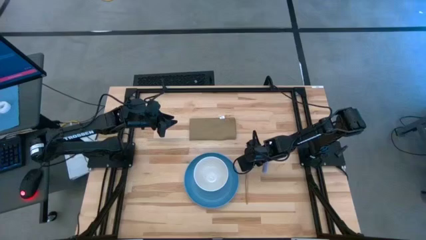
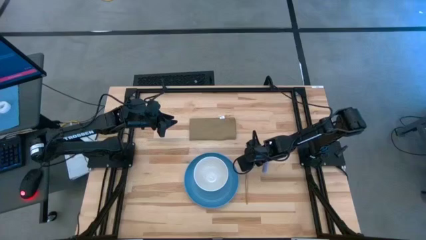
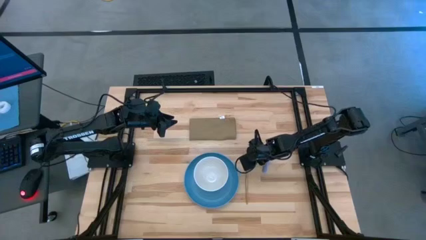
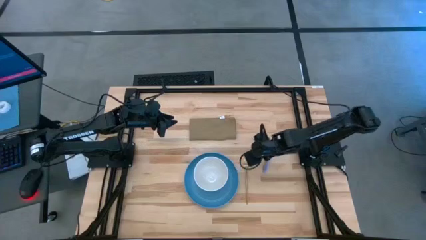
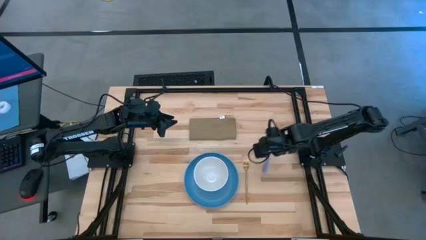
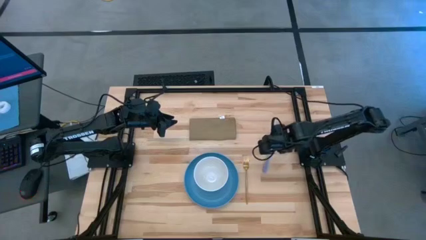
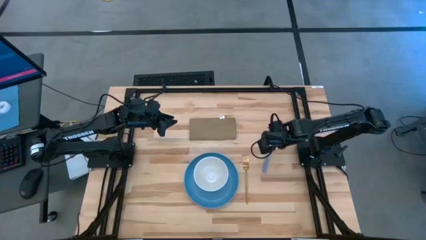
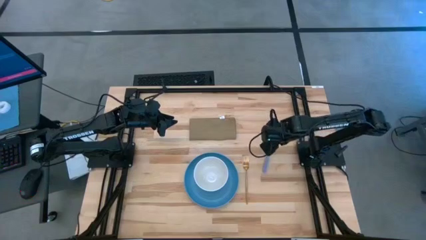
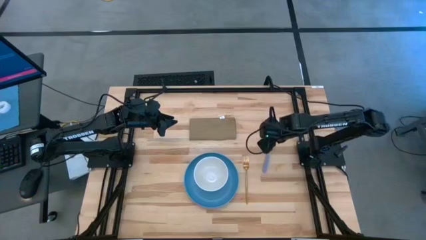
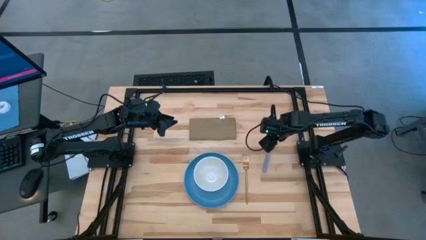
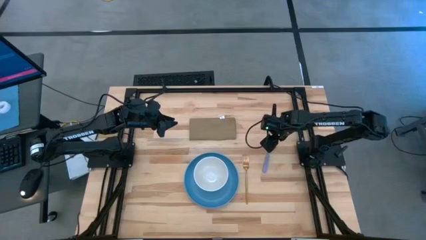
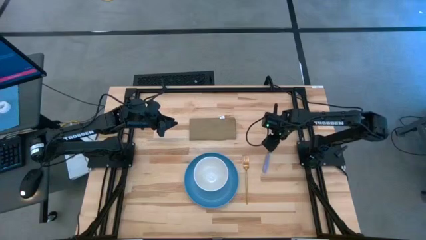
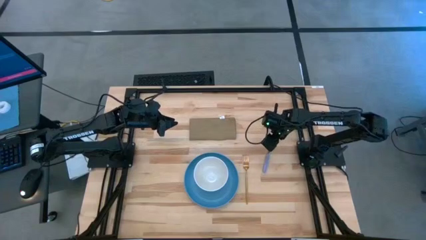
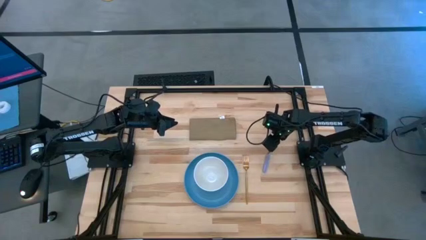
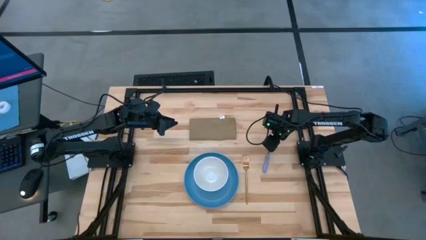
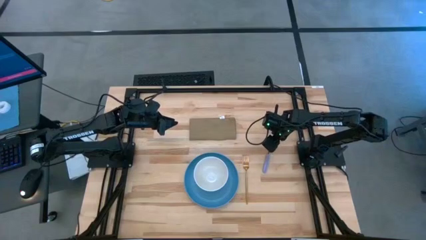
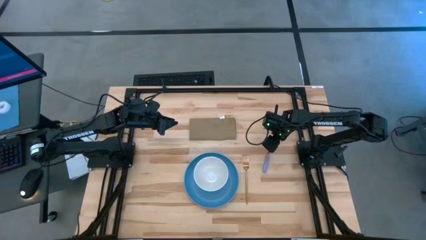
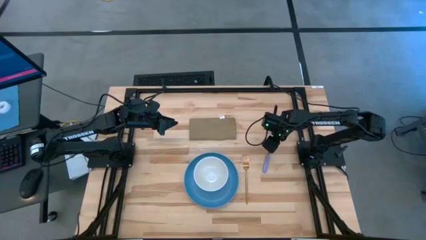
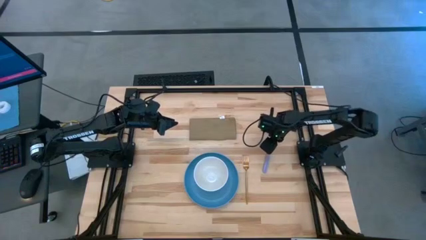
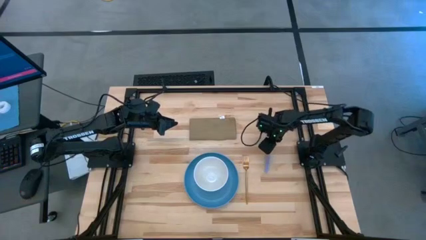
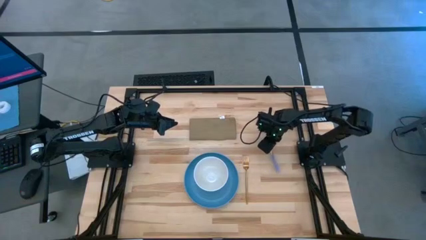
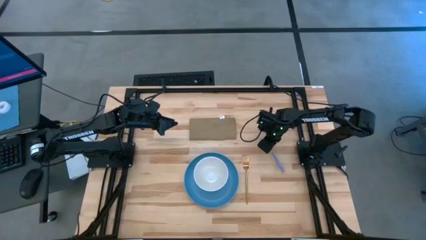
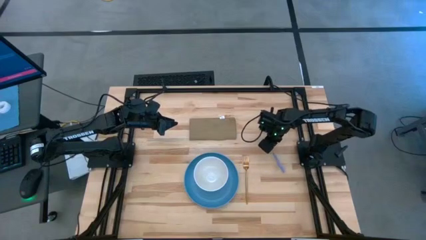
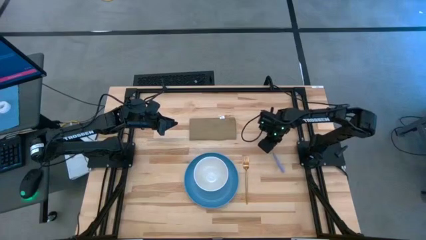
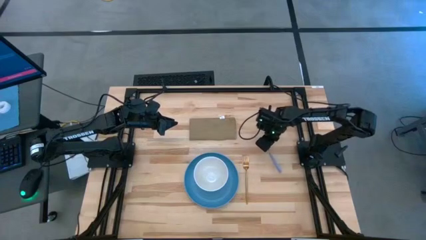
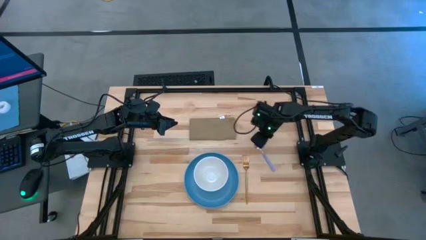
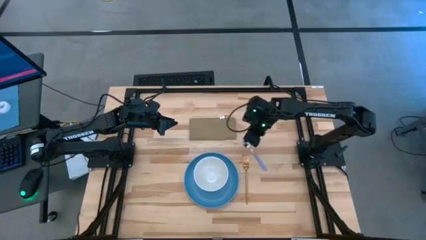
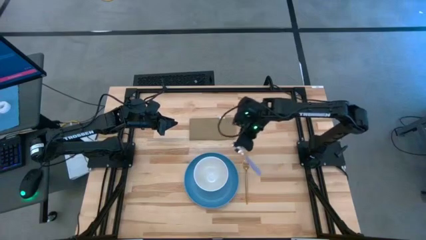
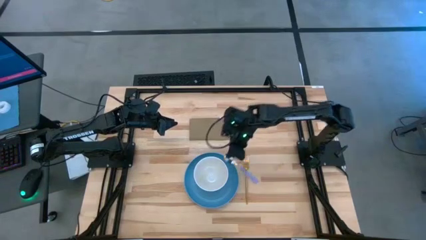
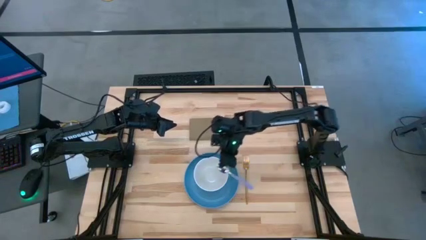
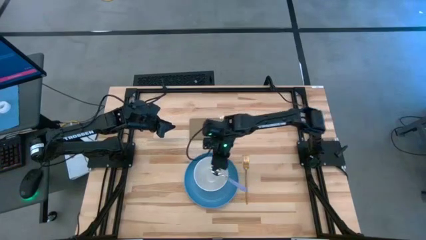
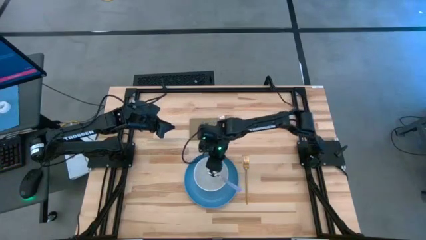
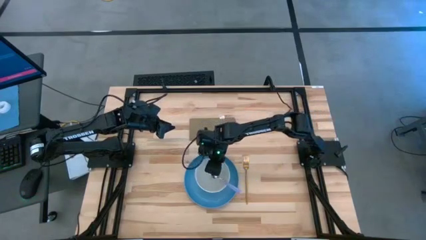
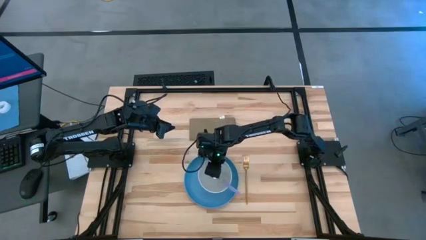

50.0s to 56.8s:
Task: Set table place
Put the violet spoon into the bowl

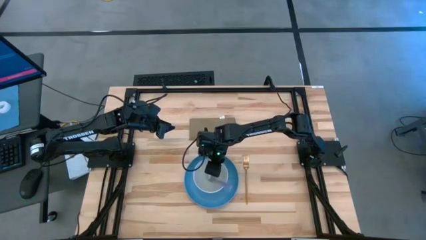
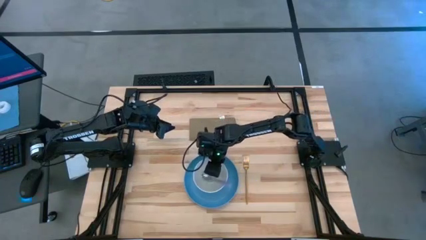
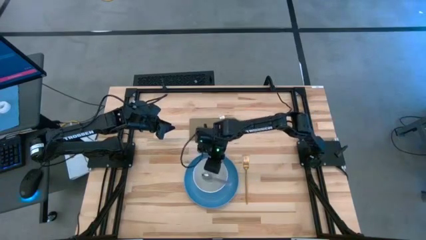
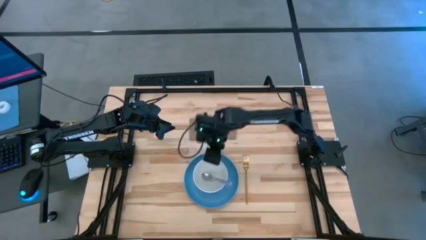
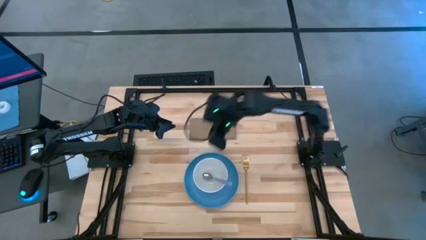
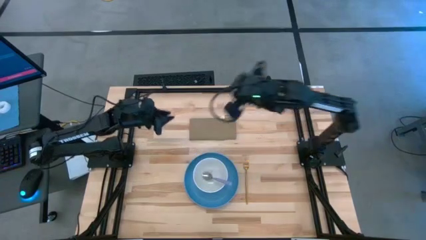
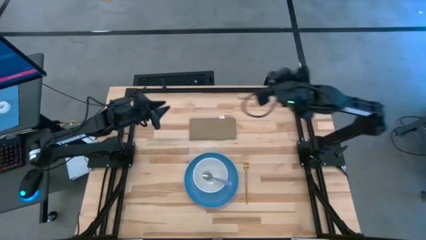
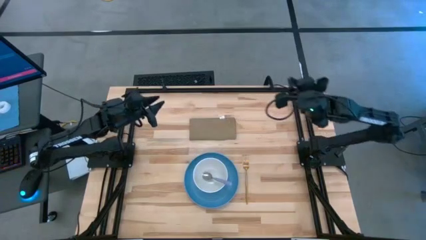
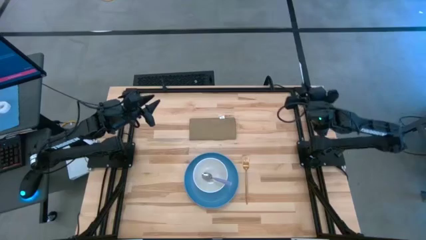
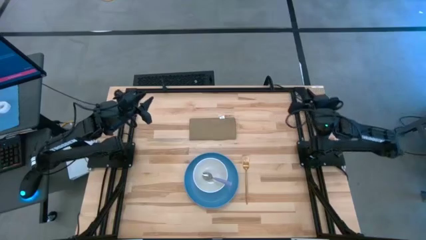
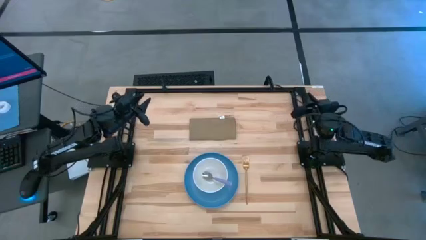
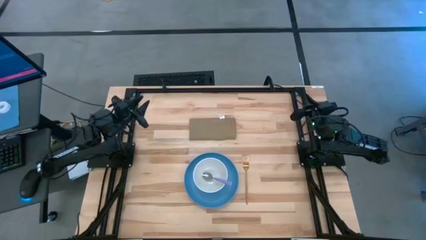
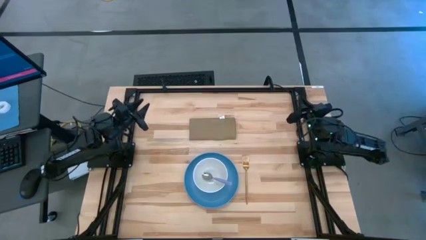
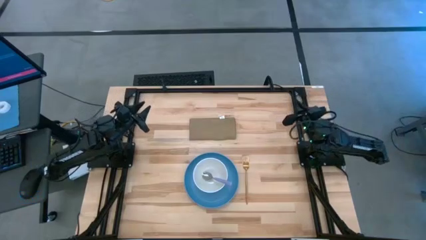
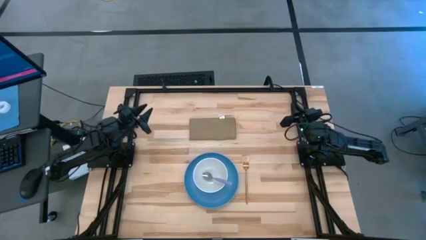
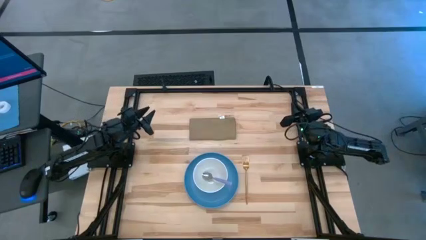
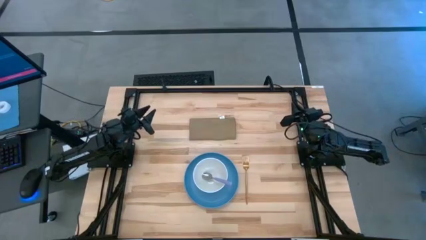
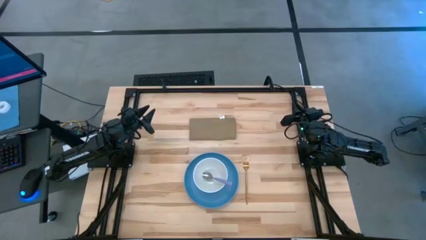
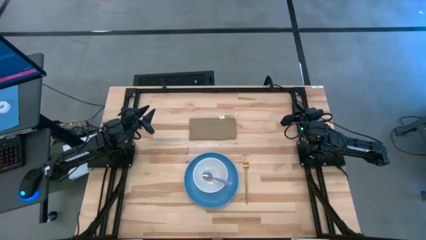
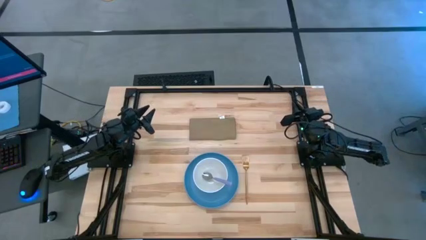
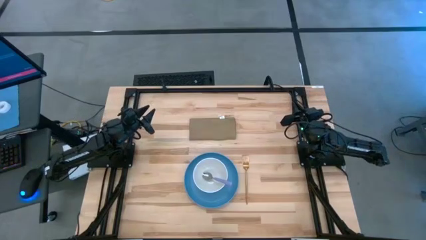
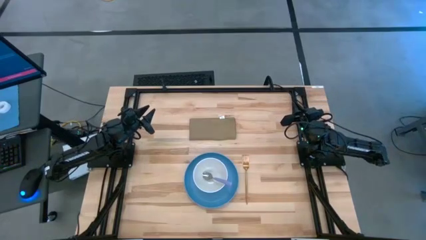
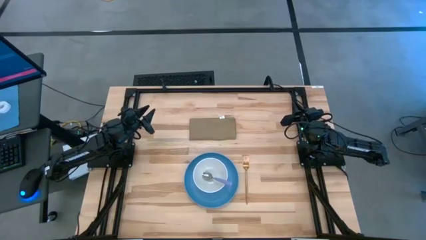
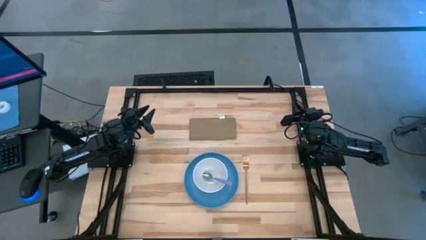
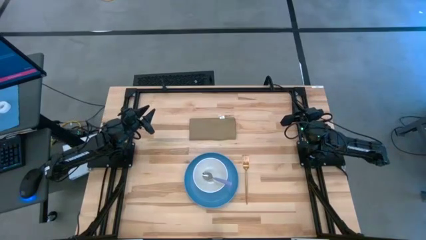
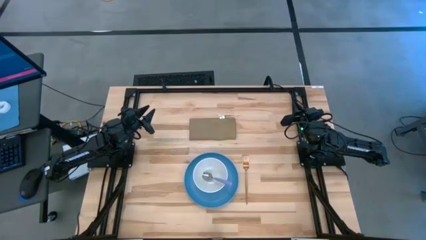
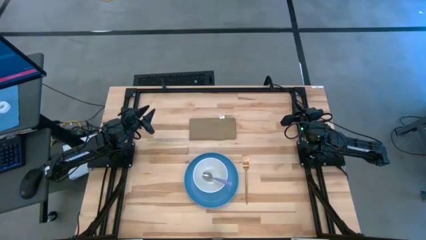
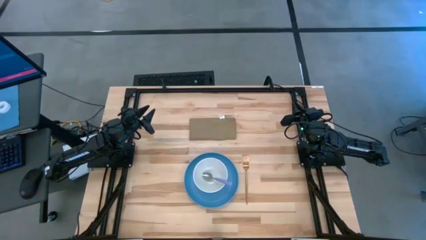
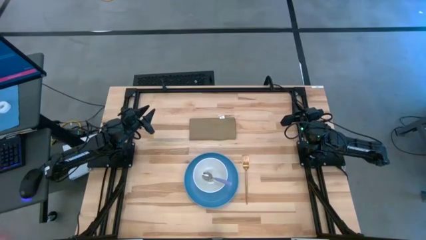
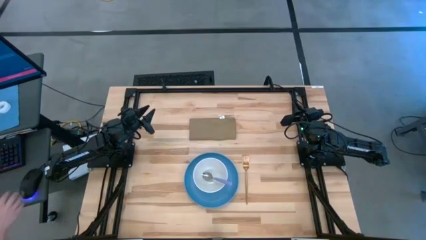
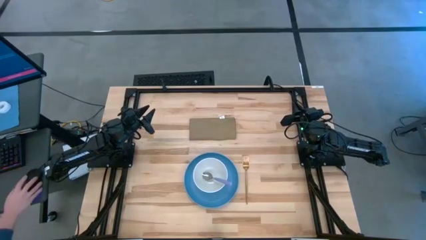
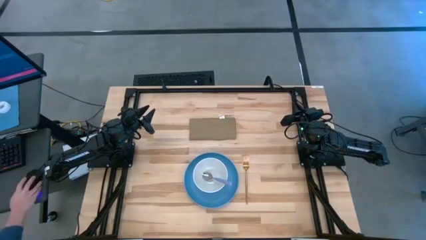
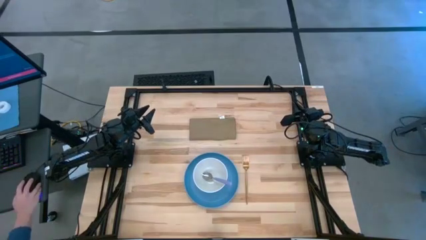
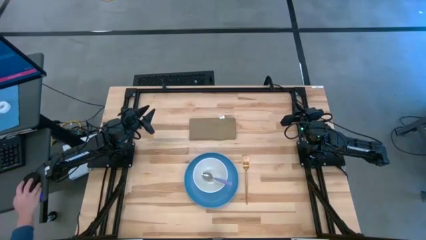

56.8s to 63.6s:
Return to Home Position

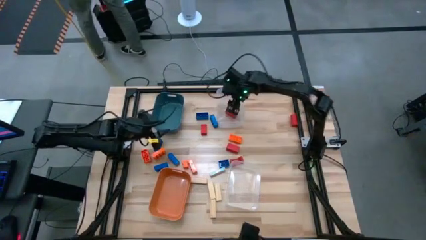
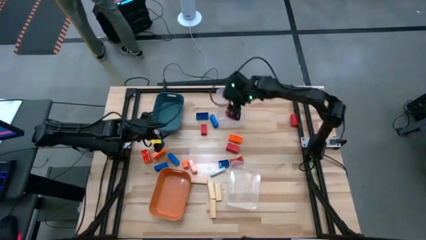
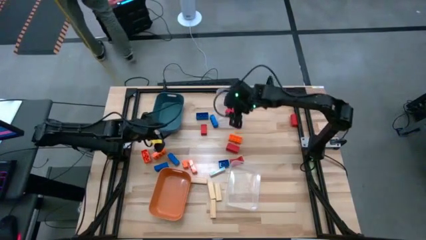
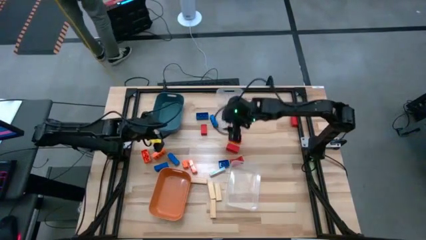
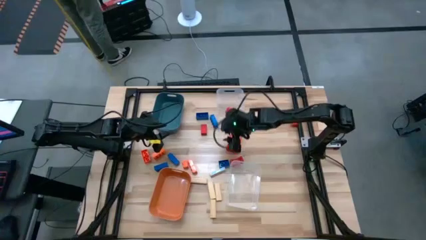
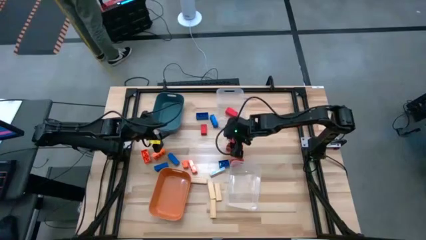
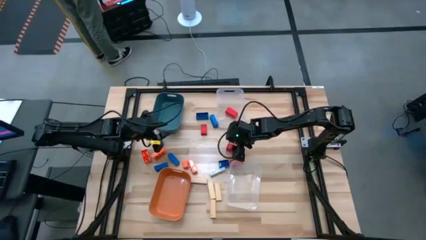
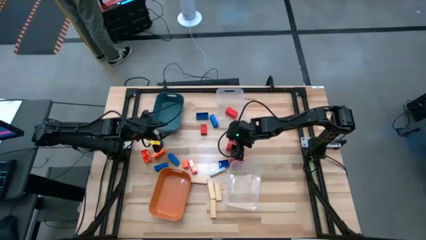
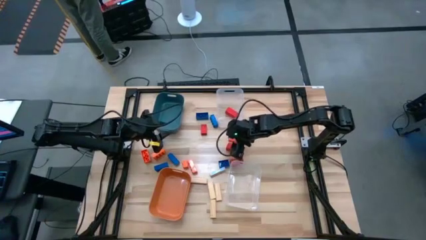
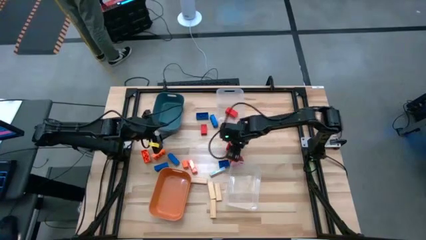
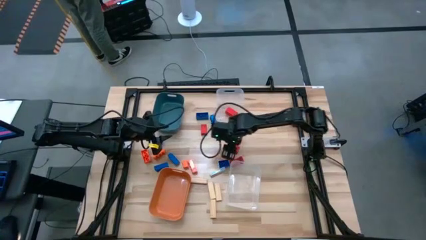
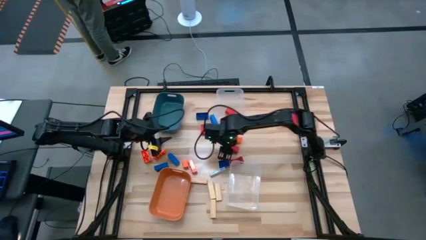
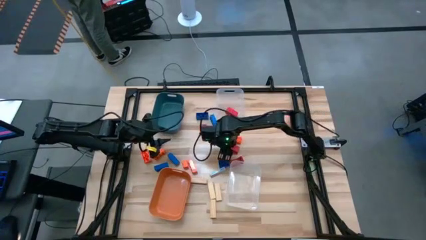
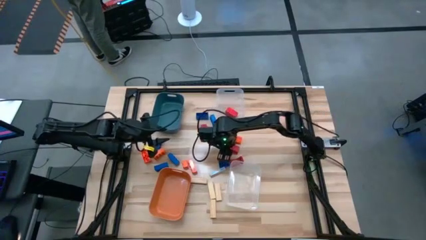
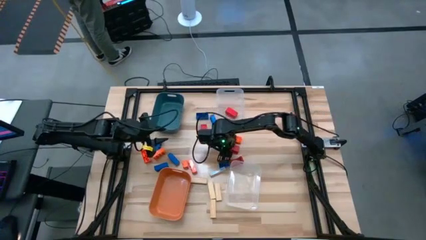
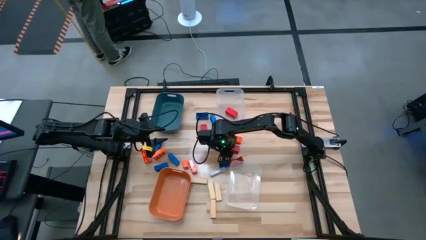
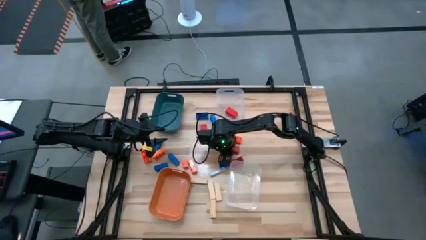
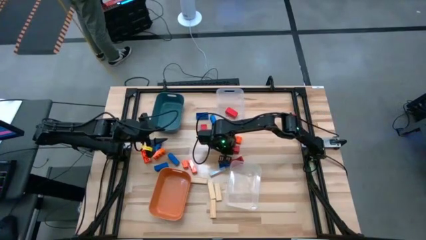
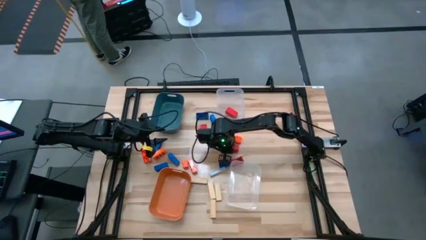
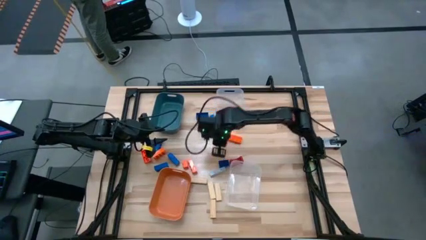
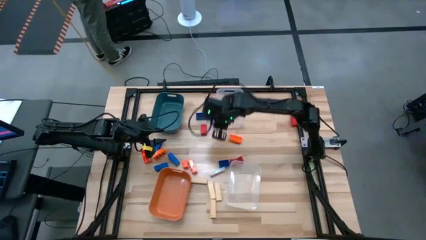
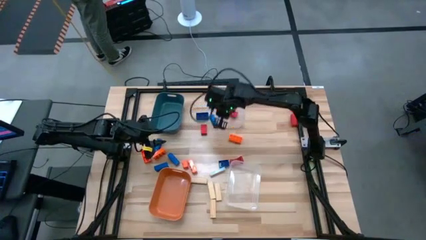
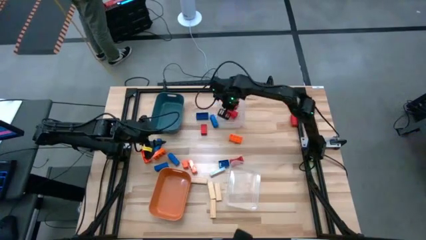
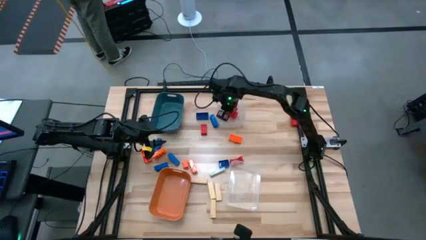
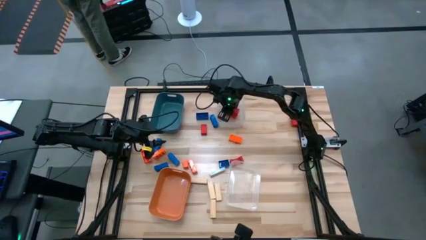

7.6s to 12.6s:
Task: Sort blocks
Put the red wooden block into the top transparent bin
